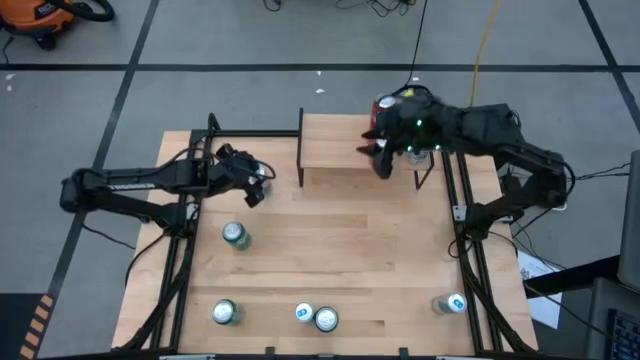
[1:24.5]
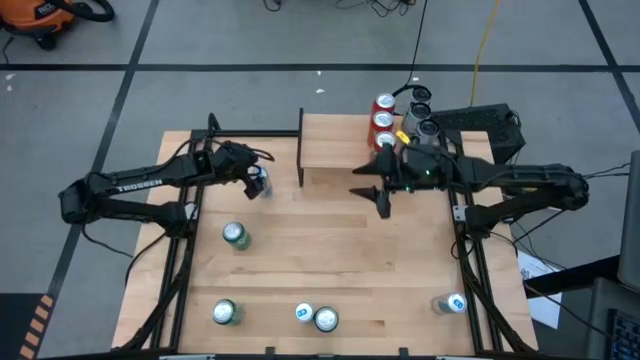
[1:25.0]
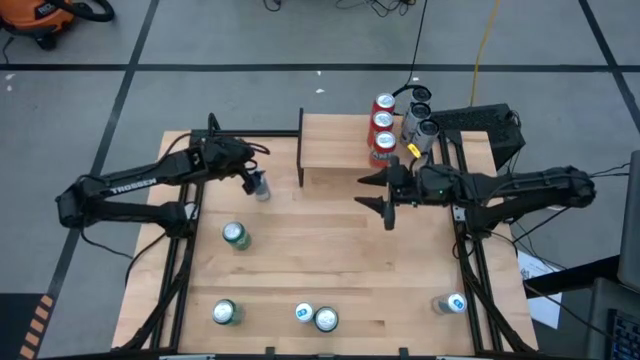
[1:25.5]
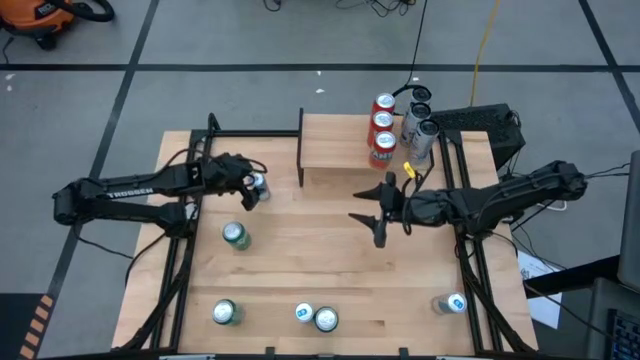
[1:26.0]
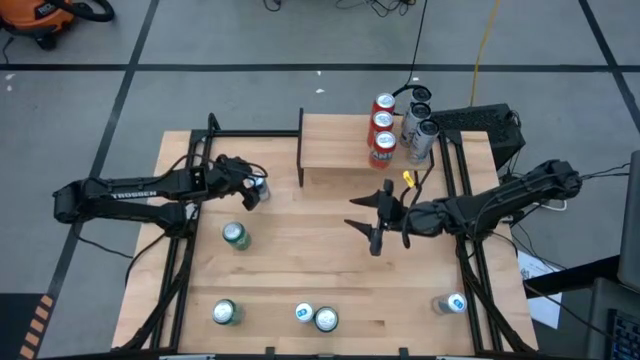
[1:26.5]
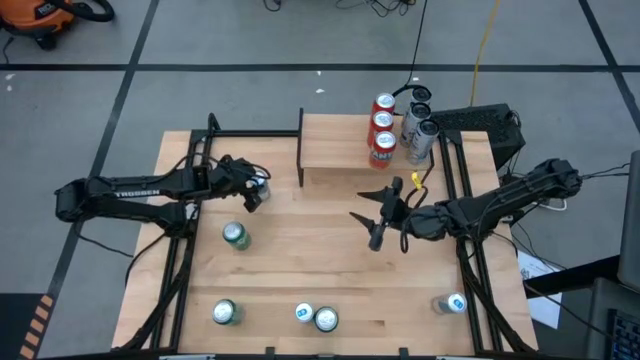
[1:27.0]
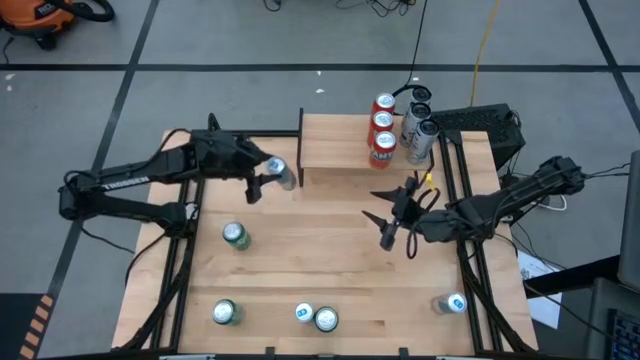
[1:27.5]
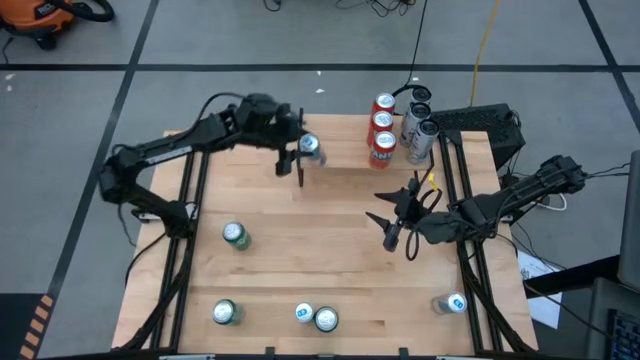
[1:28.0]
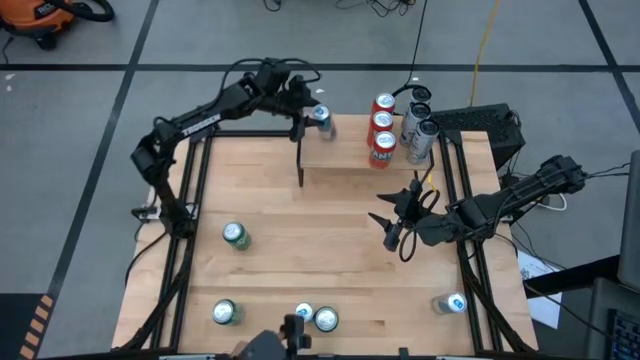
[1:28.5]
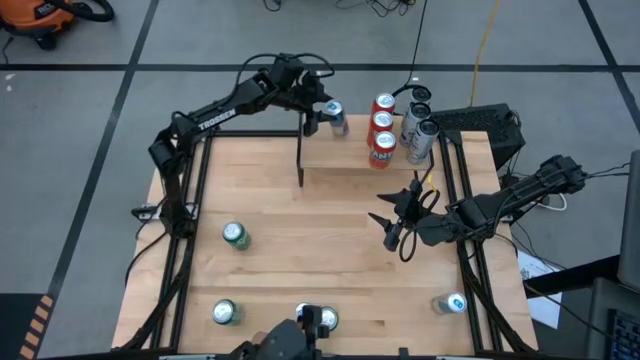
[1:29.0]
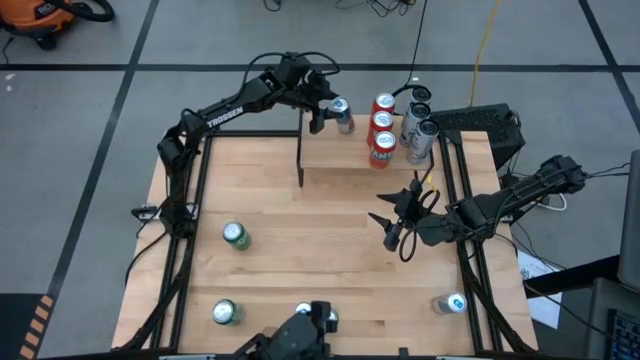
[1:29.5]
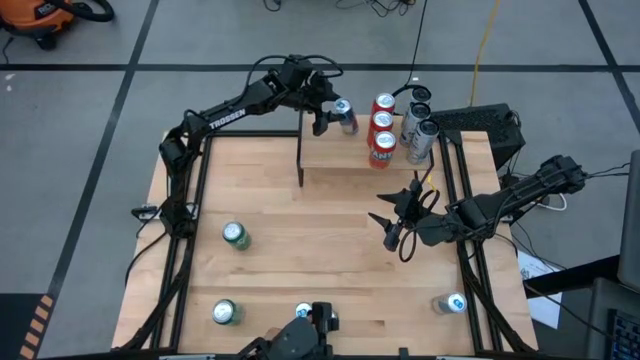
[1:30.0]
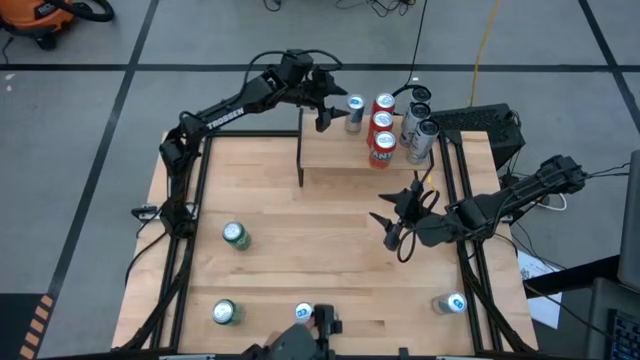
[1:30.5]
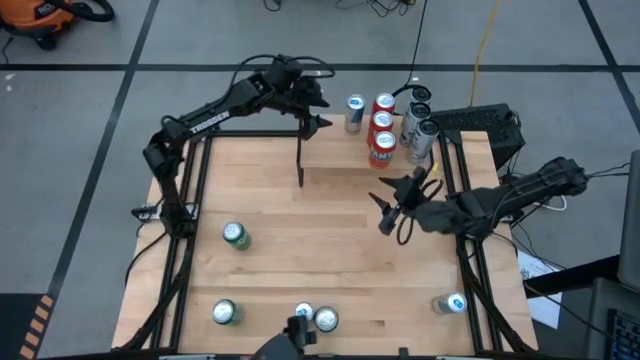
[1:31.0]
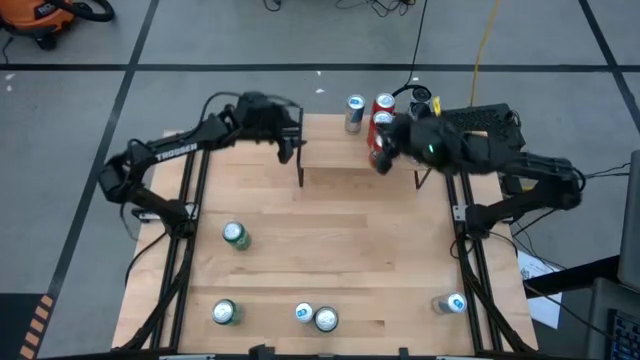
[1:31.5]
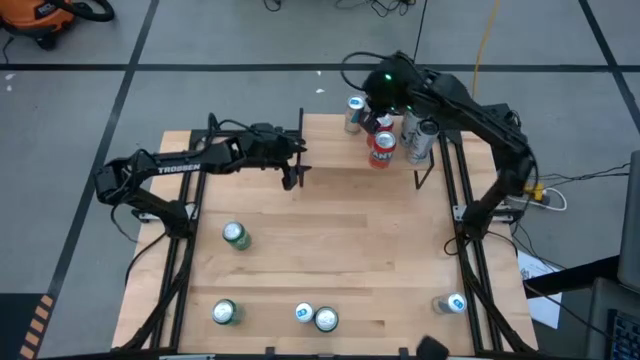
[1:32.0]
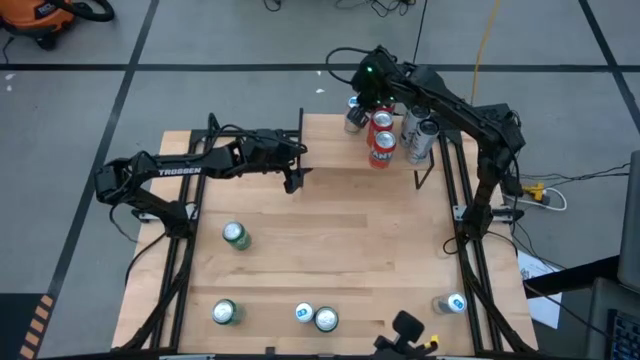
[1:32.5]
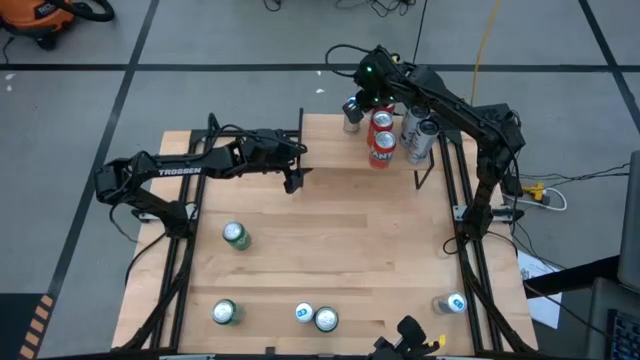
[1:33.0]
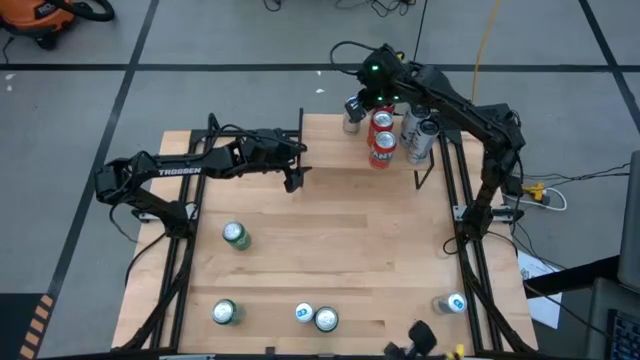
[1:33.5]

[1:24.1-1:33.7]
Task: Place canned beverage on shelf
Put the top blue soda can on the shelf

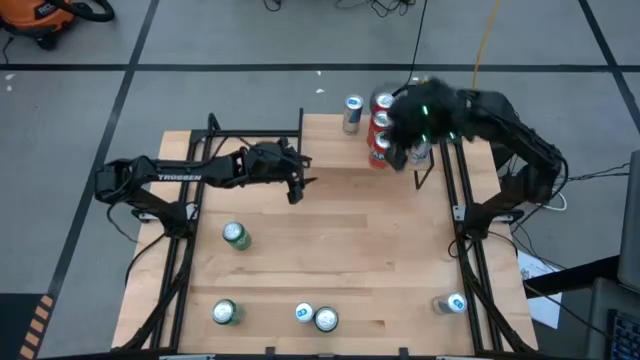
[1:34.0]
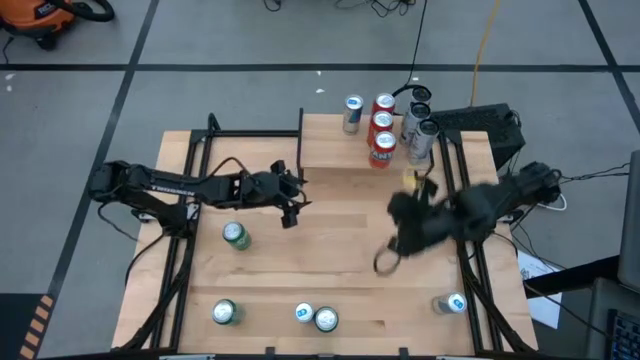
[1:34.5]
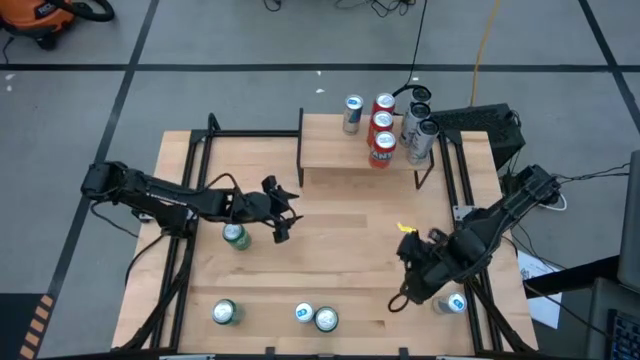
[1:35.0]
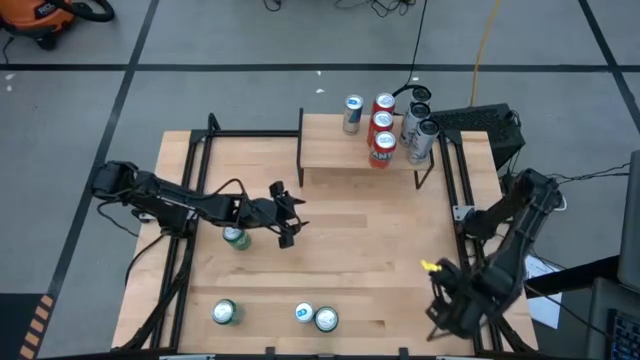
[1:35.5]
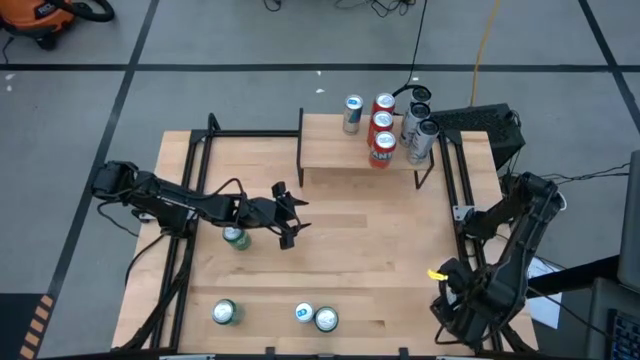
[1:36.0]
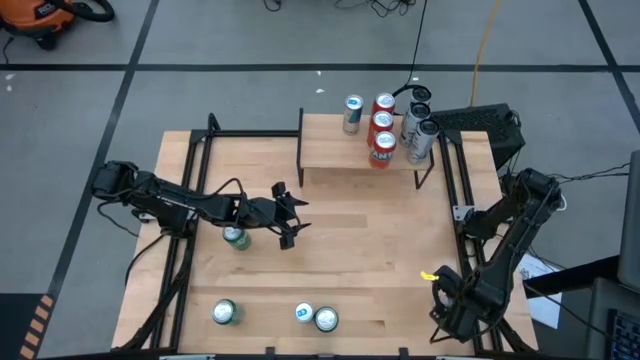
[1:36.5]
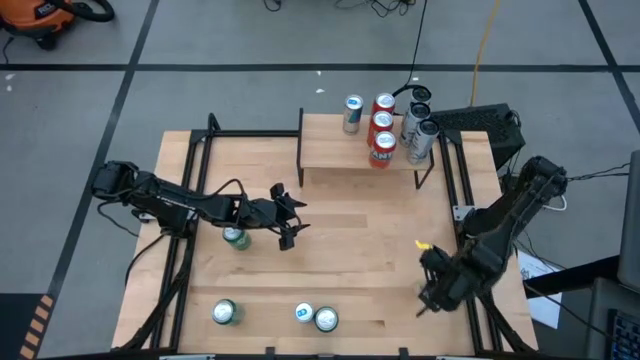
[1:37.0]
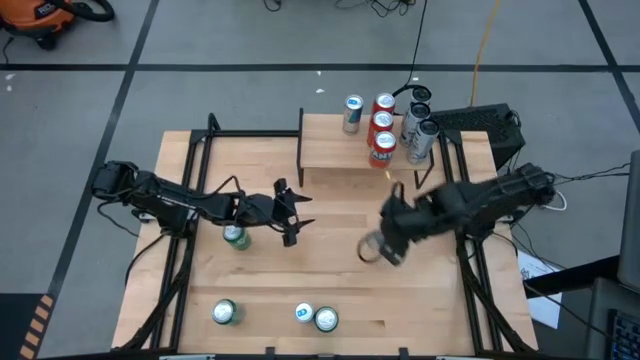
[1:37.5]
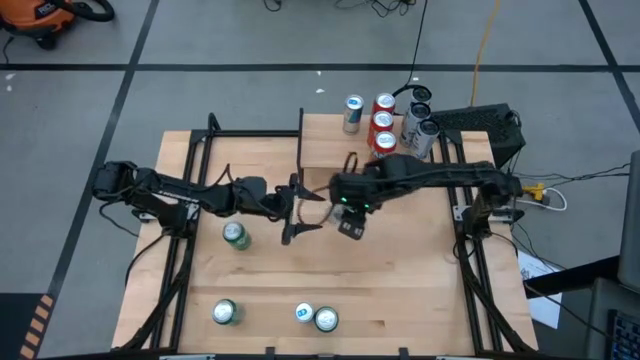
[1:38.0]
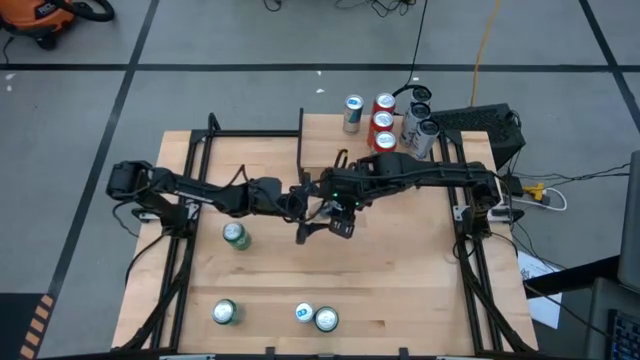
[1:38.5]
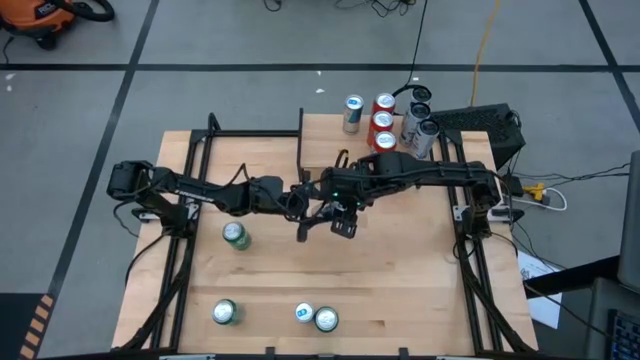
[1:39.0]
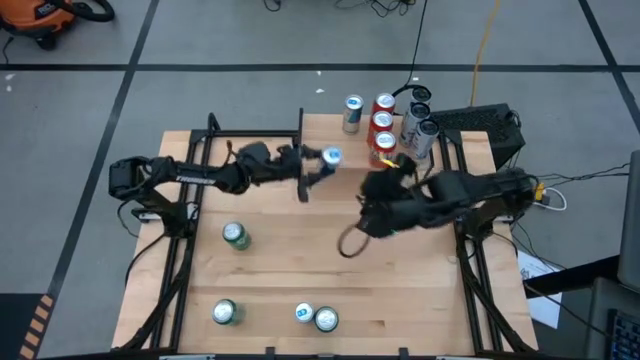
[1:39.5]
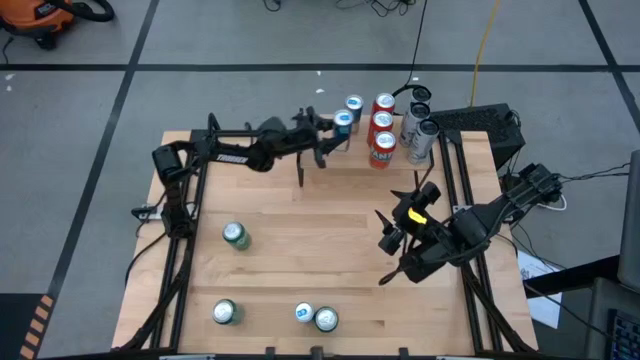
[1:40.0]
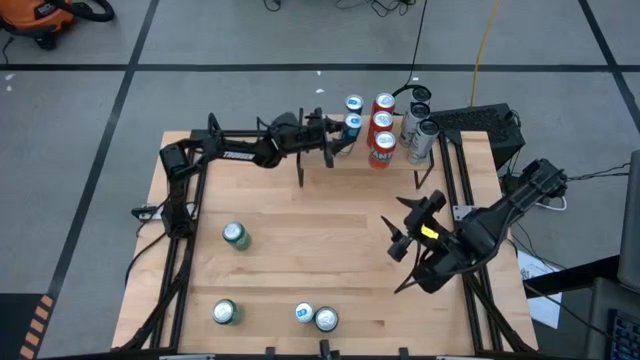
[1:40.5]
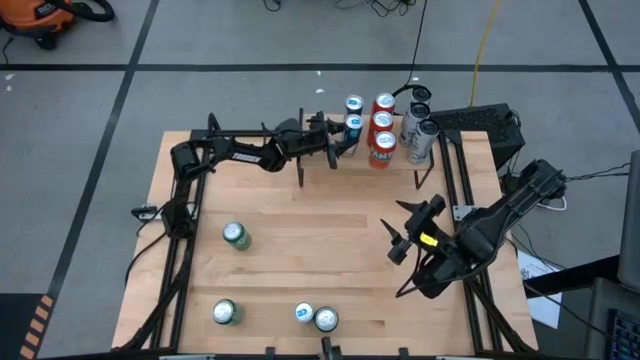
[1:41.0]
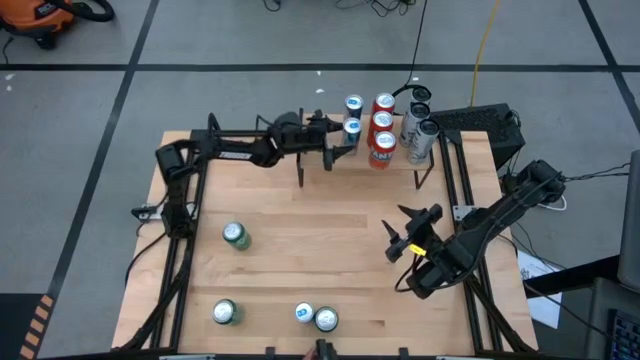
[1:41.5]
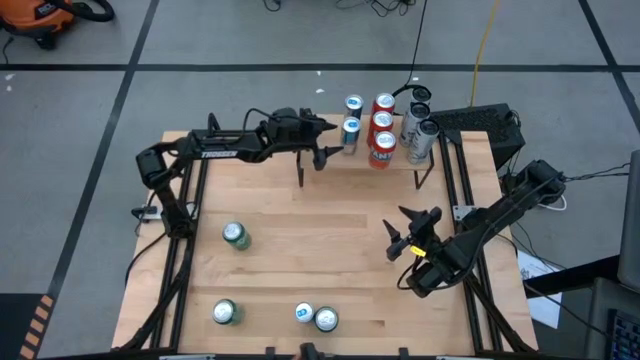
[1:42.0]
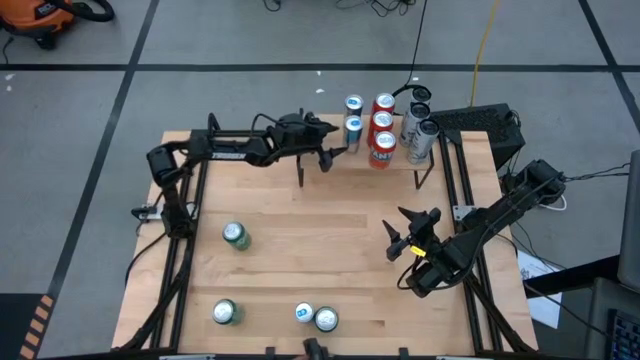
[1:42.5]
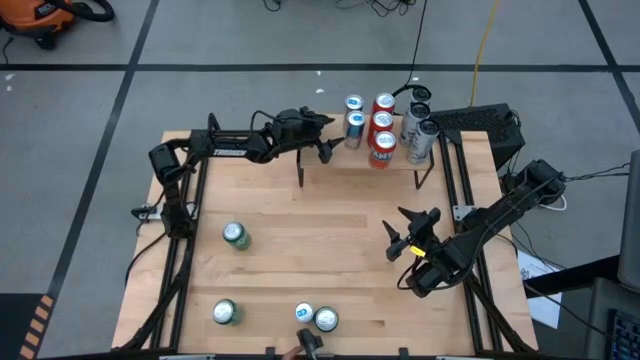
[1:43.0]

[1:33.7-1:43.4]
Put the right blue soda can on the shelf aligned with the other blue soda can
